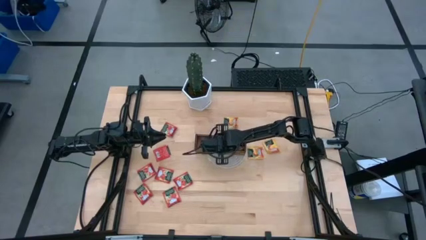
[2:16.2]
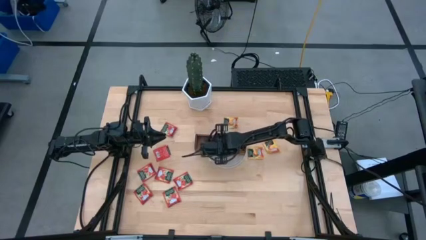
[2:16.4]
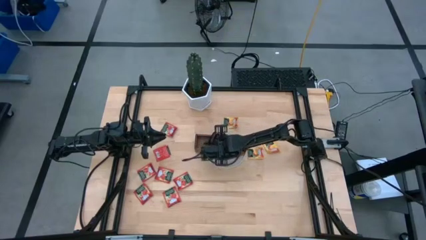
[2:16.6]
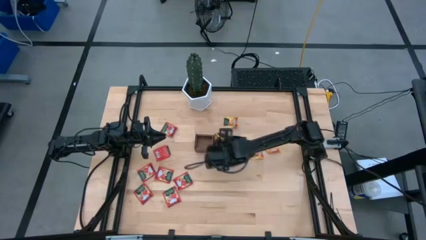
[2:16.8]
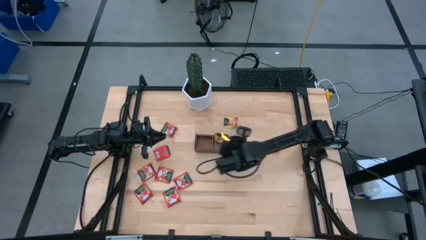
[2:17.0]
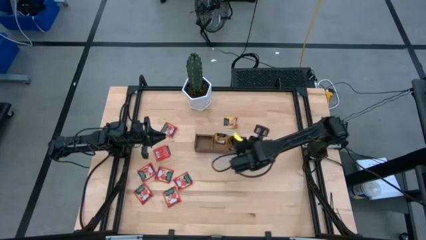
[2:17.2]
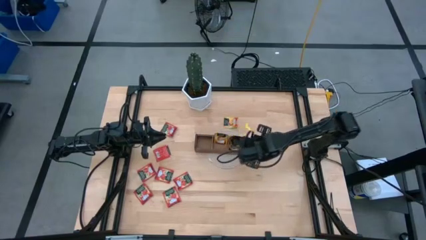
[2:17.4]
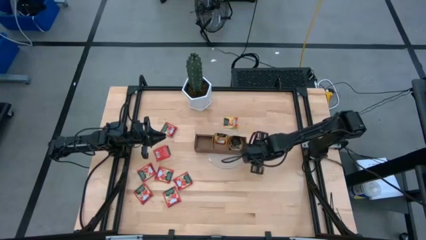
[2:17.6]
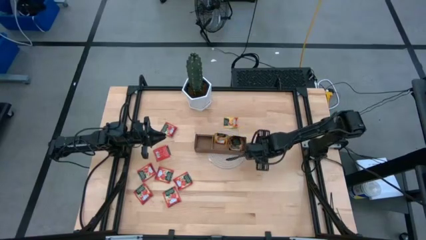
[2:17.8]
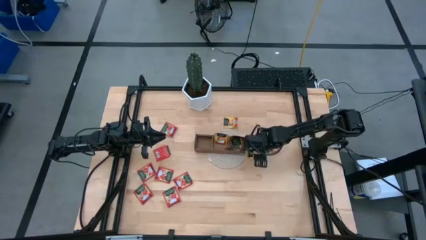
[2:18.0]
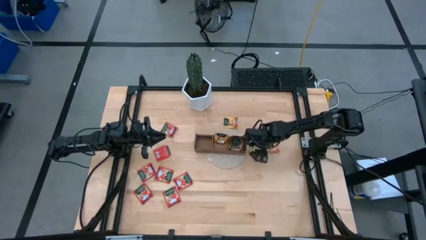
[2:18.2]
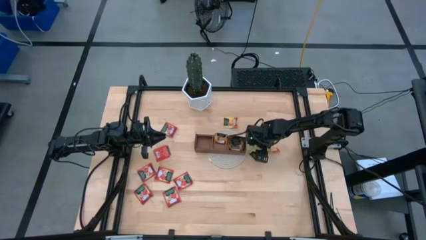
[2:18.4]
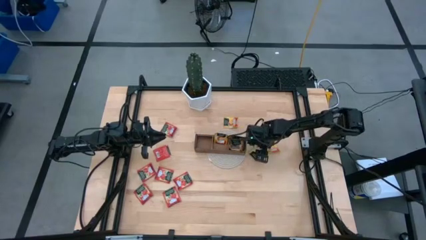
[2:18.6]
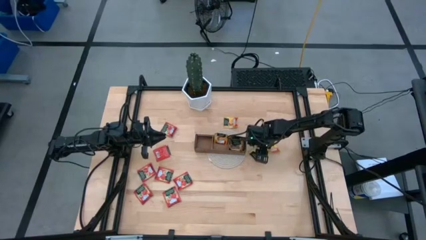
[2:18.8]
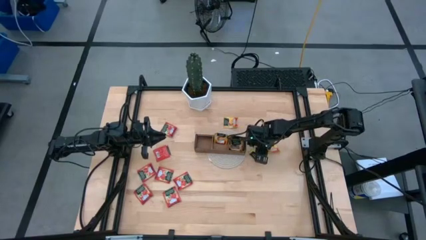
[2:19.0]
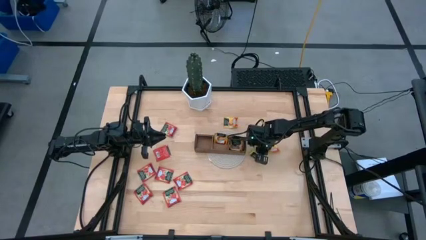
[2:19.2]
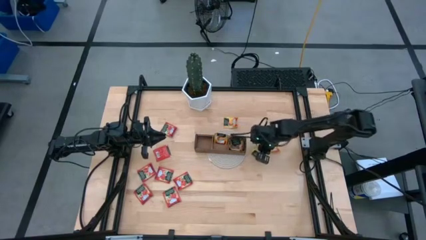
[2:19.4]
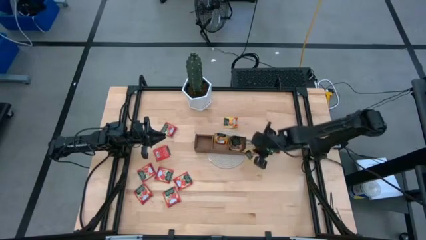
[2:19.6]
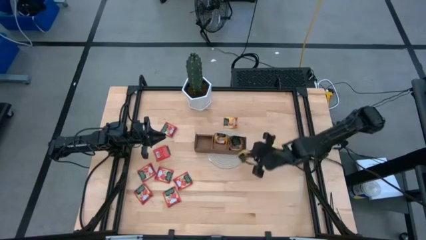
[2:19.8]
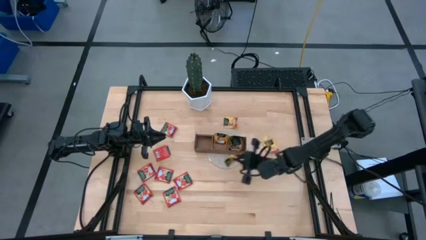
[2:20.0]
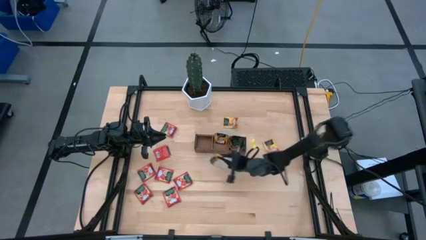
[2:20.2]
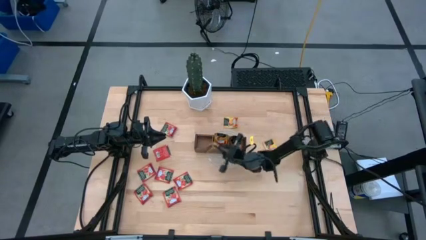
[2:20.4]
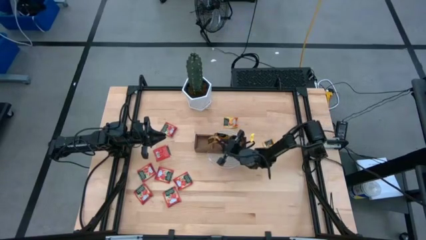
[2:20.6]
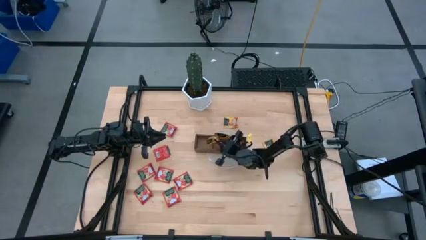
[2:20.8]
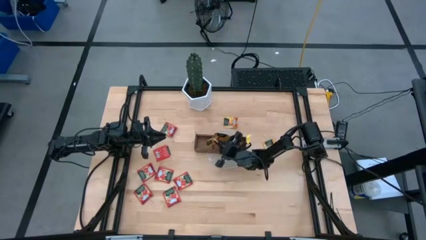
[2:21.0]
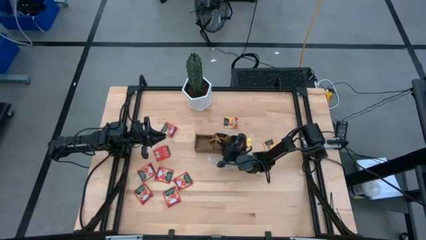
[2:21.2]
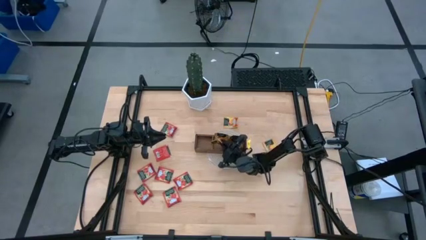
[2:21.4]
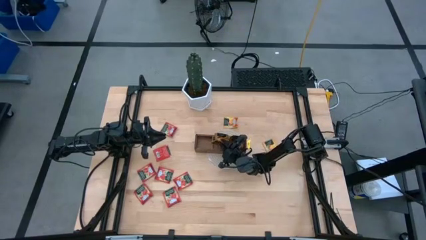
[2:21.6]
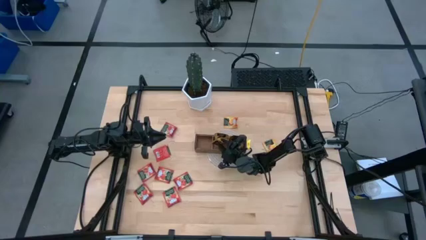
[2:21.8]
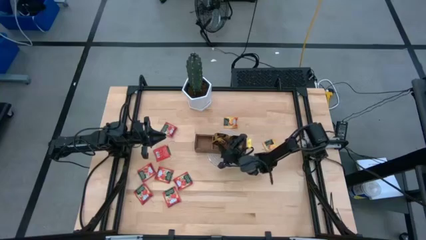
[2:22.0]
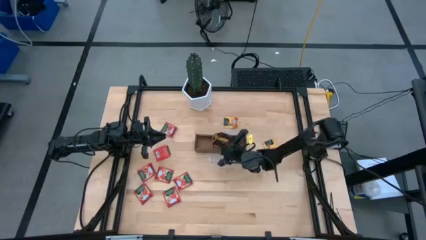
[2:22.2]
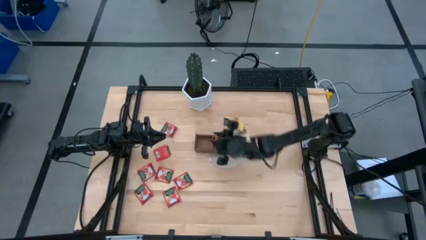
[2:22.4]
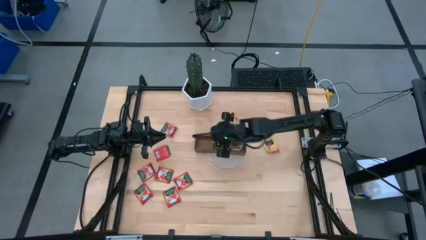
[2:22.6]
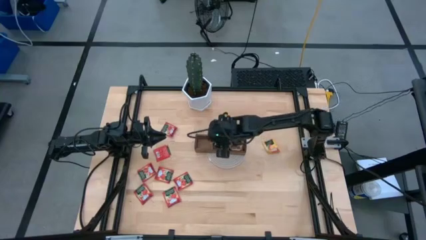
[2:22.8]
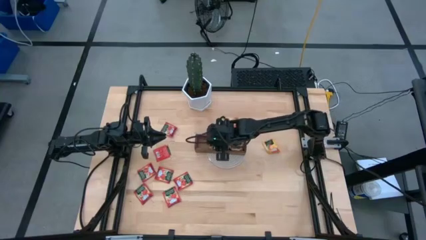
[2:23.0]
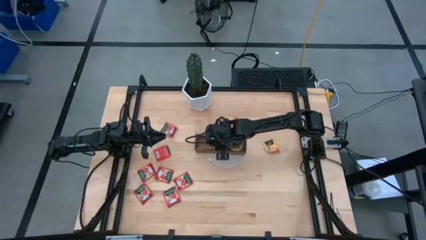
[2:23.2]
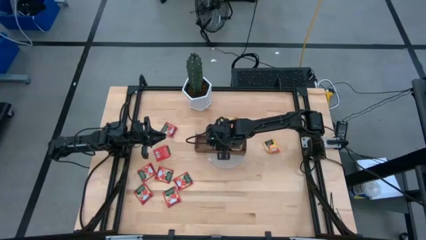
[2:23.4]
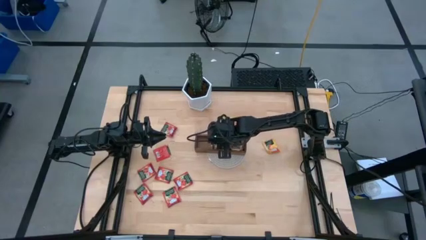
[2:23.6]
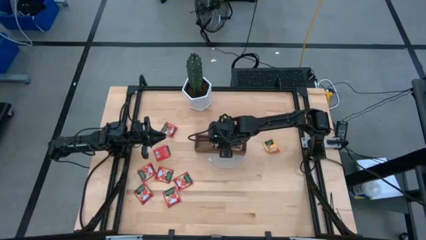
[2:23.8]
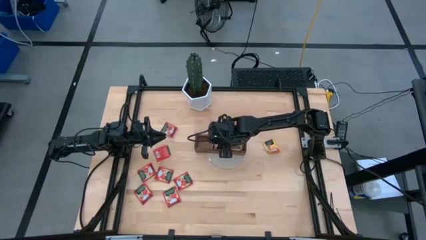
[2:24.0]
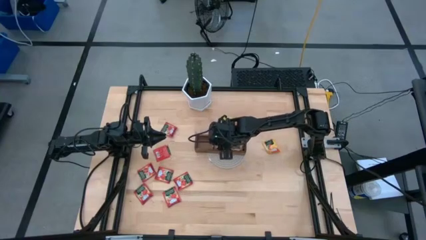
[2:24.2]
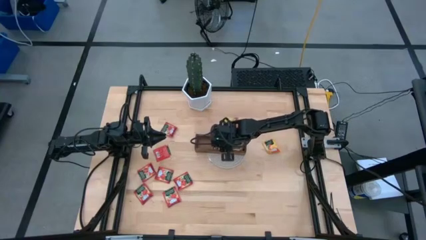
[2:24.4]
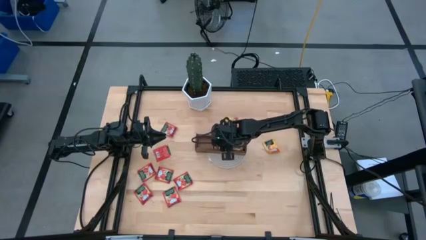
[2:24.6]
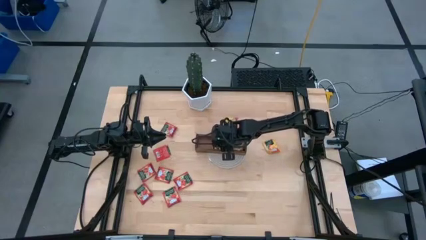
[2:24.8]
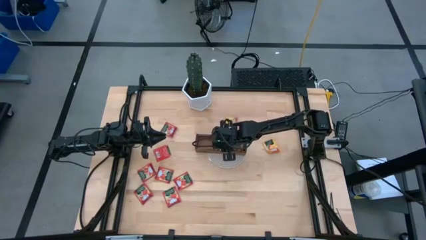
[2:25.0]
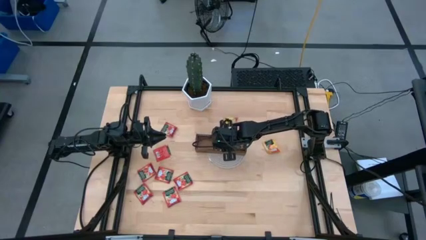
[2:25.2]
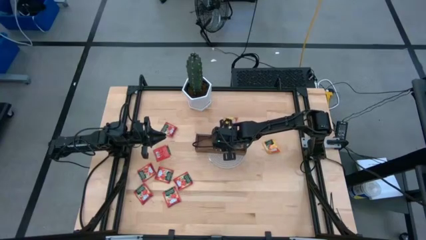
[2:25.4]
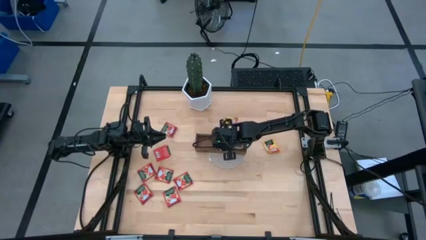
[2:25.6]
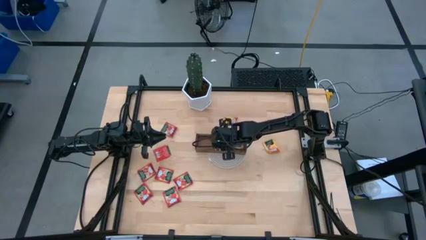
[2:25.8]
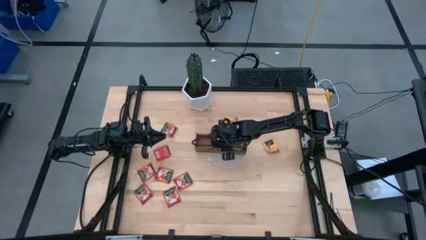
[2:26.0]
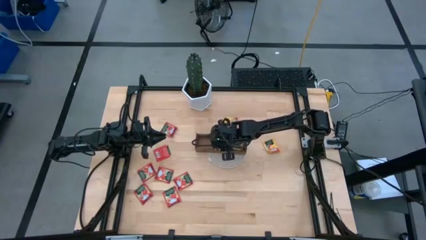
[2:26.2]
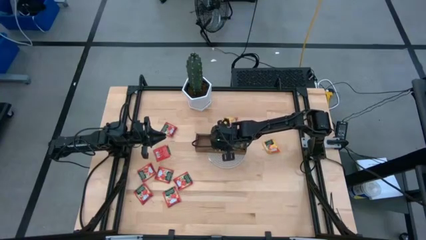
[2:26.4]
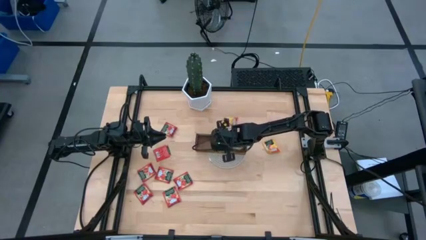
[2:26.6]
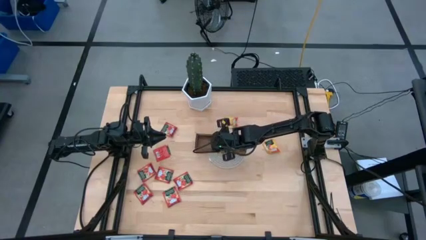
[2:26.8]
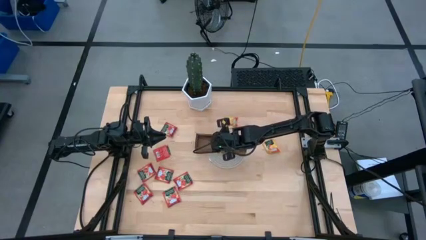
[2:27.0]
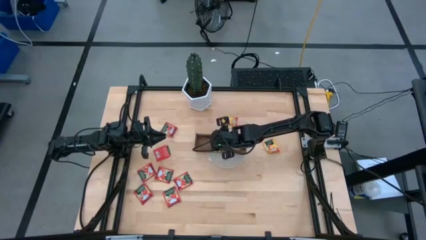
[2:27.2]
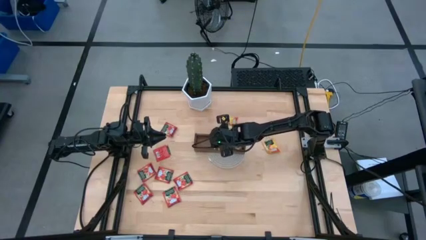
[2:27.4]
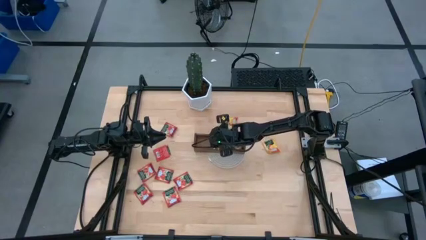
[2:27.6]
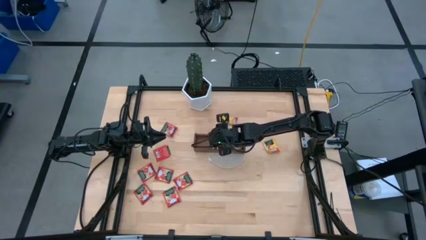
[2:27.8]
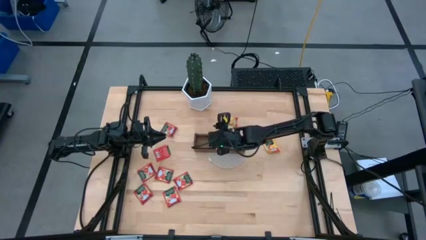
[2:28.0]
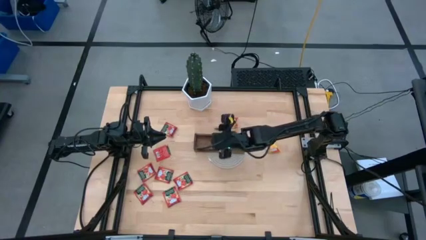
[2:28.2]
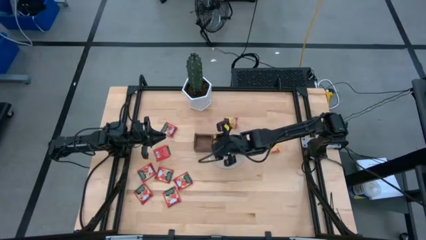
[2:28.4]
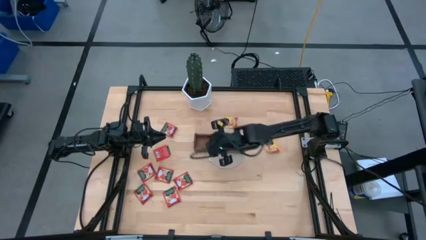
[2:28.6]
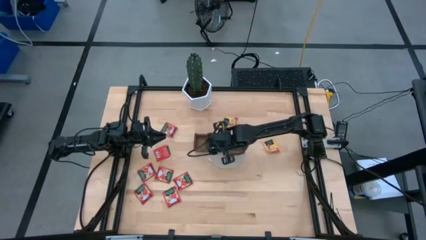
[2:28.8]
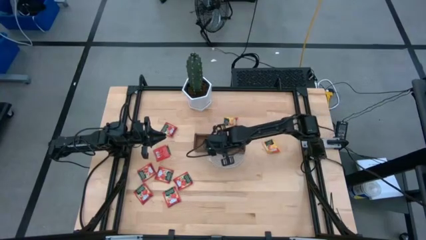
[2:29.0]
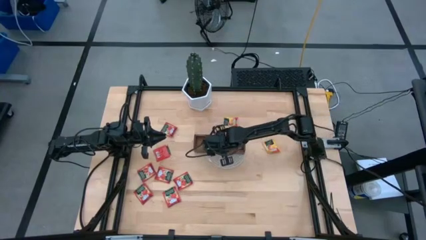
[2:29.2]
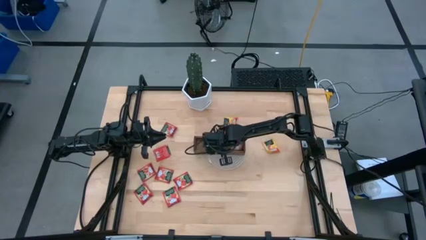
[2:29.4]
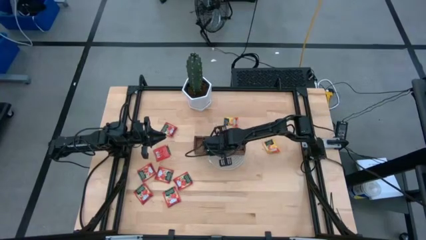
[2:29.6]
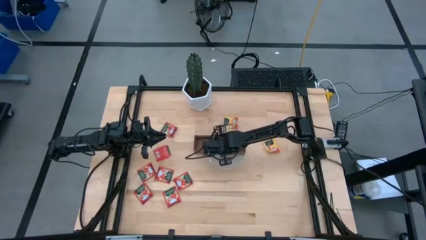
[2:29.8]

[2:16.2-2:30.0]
Task: Pick & Place Tea
Put the orange tea bag into the middle section of the wooden organizer

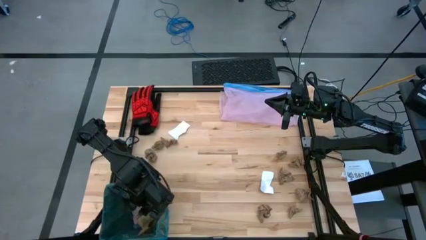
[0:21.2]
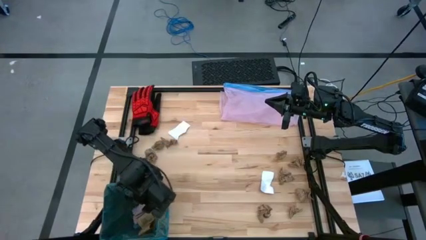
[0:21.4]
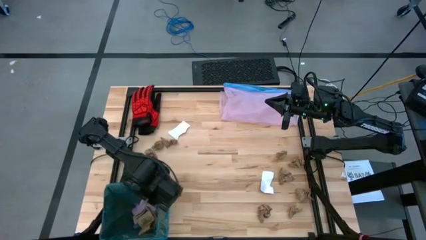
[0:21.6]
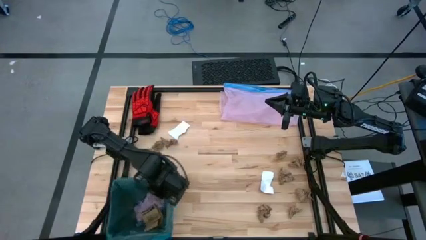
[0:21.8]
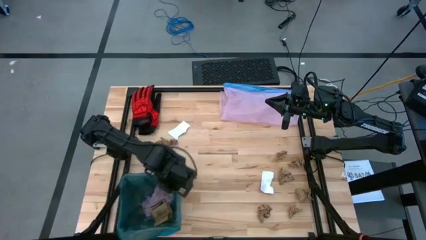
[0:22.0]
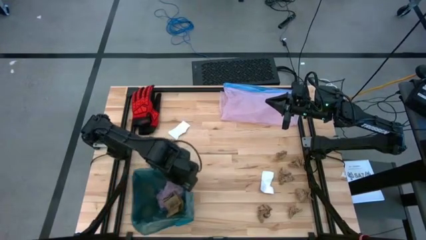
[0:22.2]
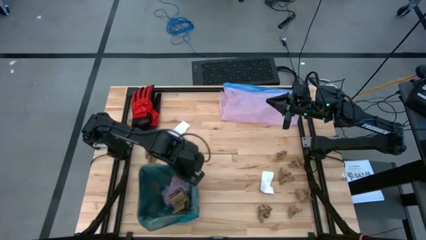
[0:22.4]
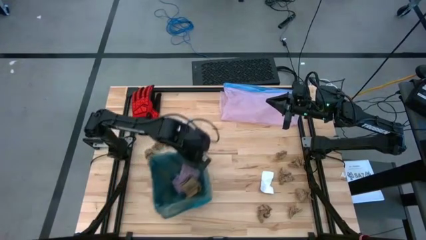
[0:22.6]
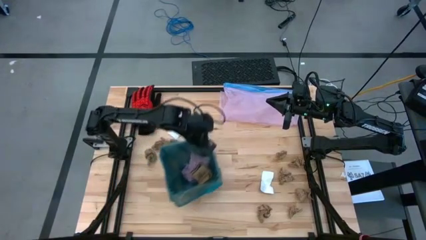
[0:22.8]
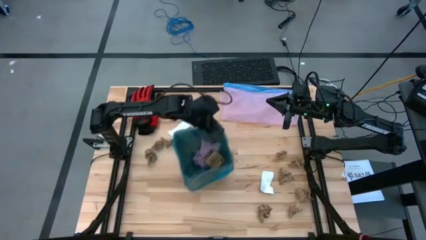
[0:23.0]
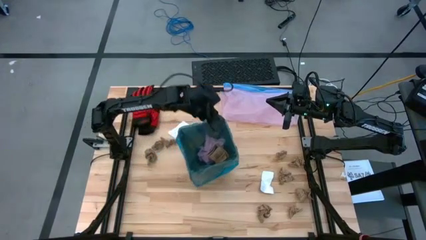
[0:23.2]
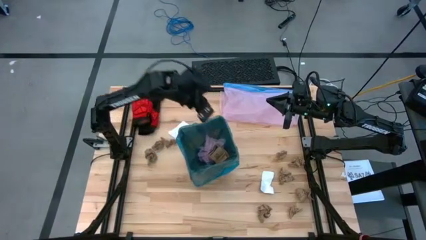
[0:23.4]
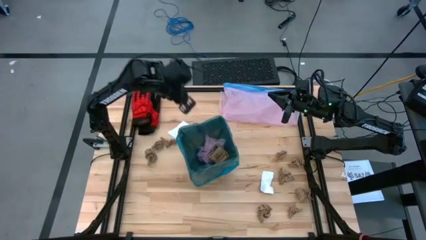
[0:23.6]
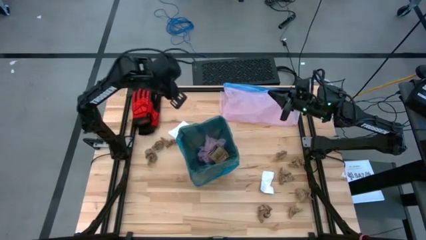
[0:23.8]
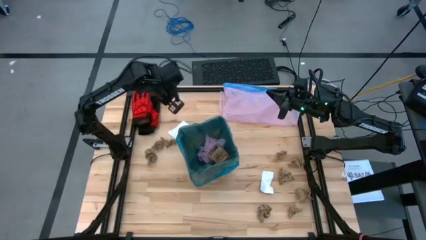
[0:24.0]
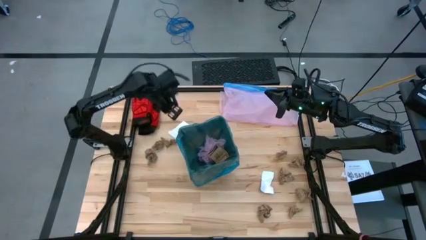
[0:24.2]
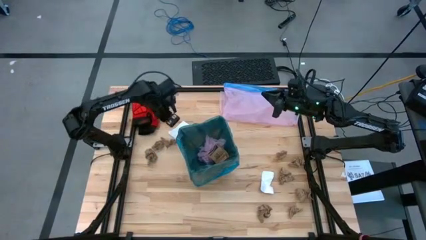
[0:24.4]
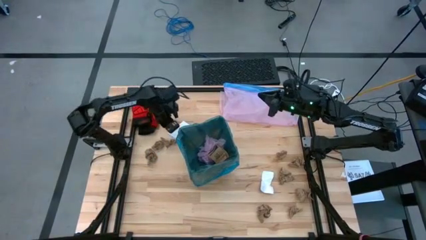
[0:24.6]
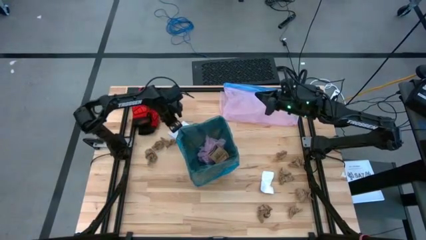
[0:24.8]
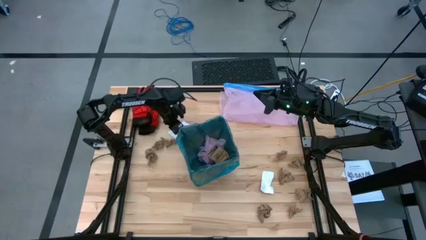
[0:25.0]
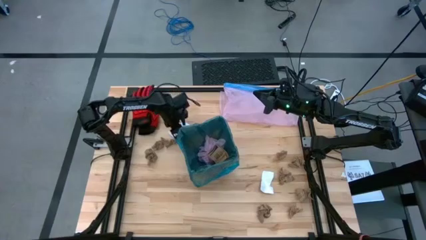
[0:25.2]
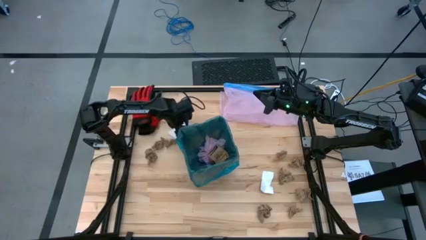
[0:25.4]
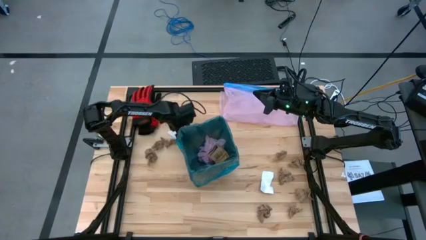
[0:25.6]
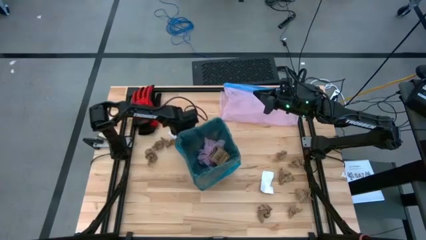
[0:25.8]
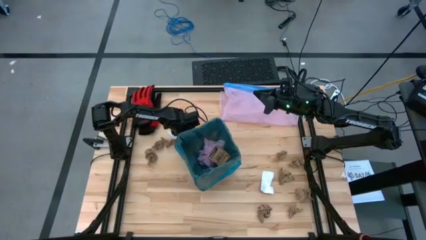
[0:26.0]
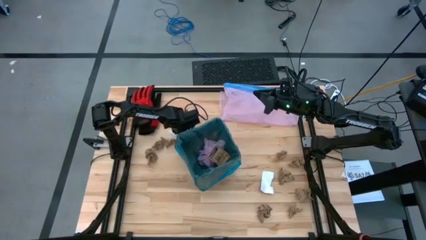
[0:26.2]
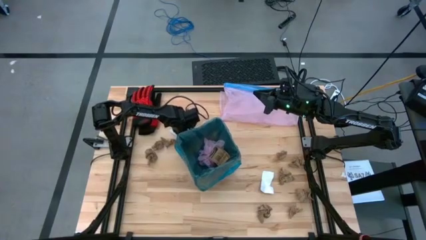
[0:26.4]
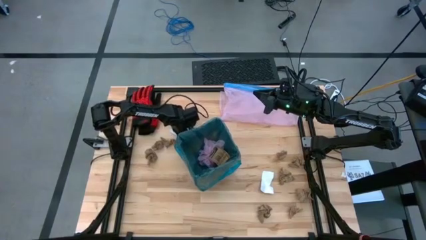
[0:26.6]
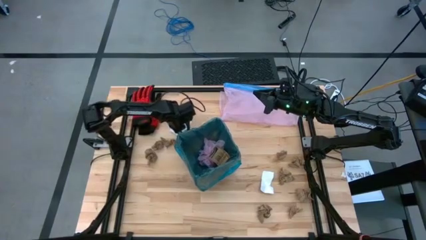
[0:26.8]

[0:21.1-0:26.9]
Task: place trash/remove bag and relplace
Move the black trash bin to the center of the table
